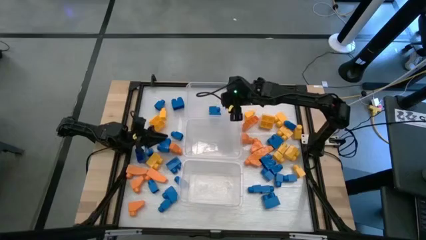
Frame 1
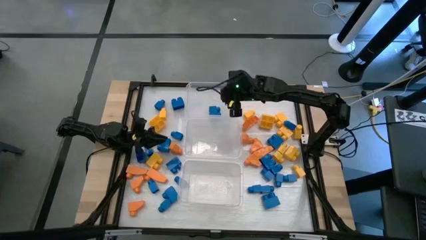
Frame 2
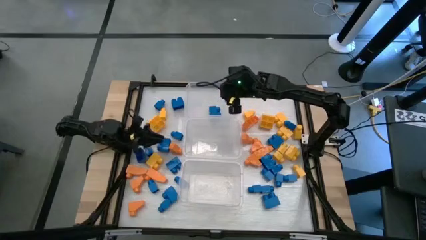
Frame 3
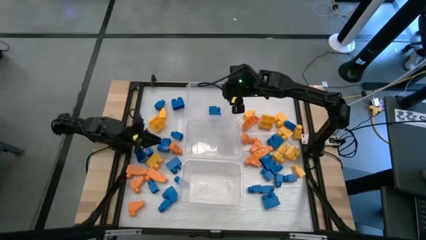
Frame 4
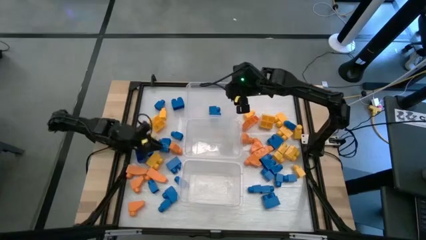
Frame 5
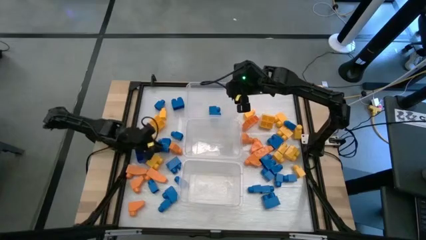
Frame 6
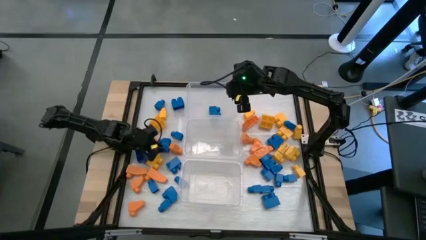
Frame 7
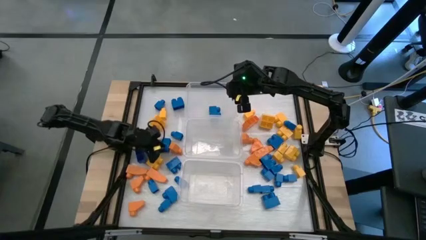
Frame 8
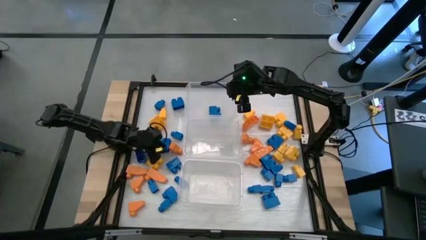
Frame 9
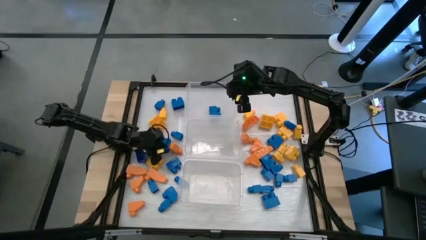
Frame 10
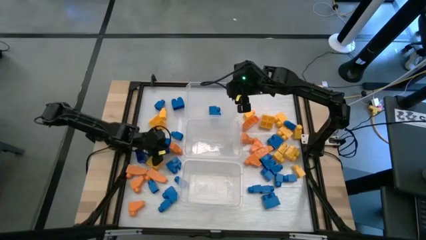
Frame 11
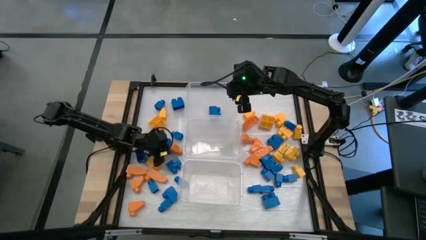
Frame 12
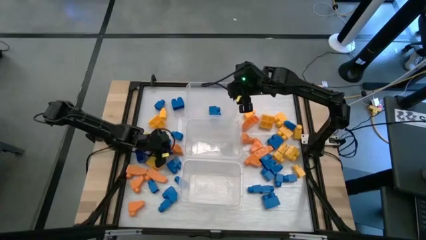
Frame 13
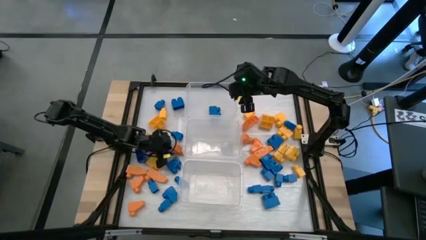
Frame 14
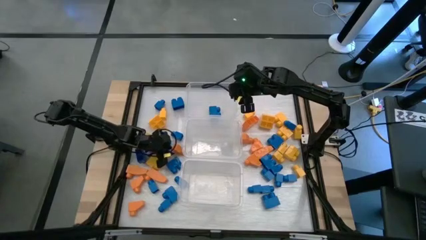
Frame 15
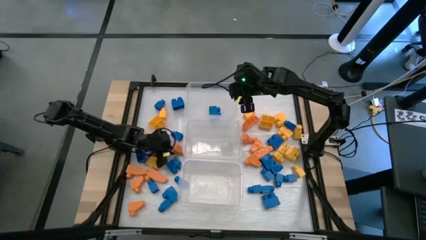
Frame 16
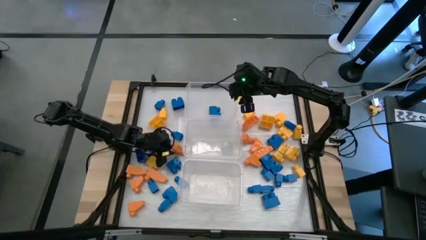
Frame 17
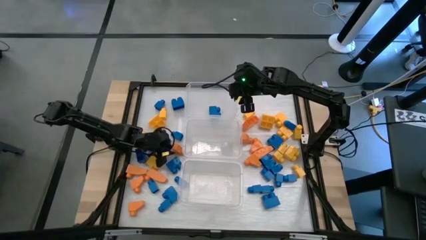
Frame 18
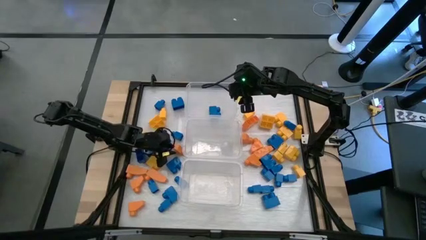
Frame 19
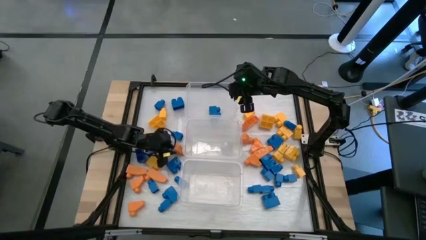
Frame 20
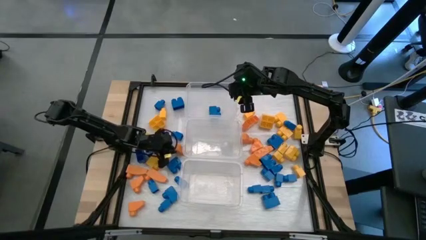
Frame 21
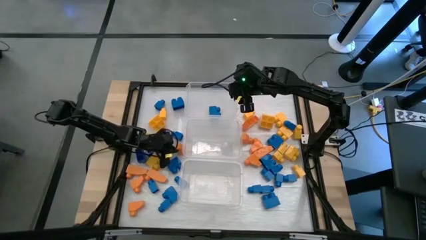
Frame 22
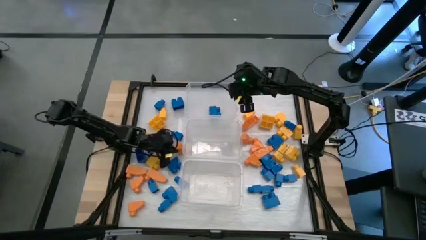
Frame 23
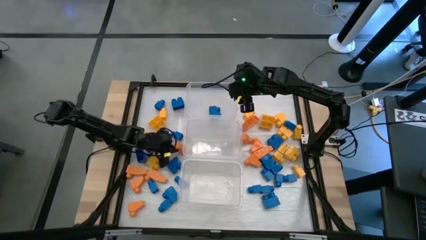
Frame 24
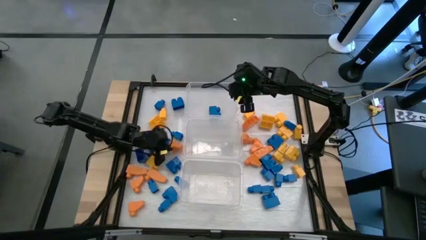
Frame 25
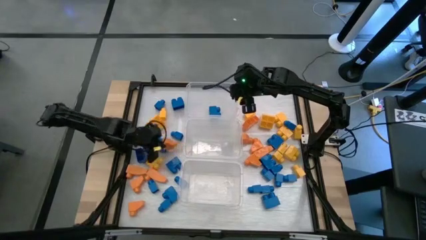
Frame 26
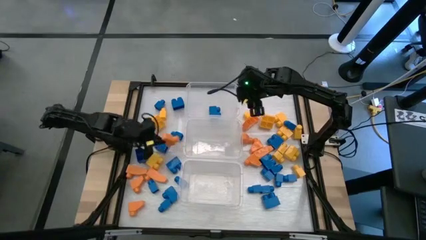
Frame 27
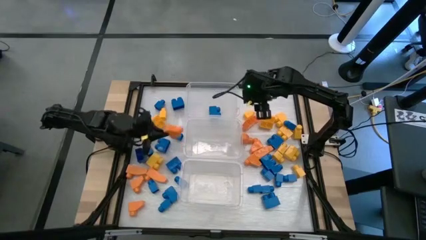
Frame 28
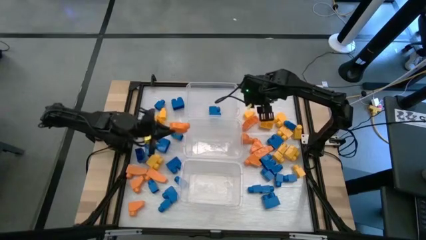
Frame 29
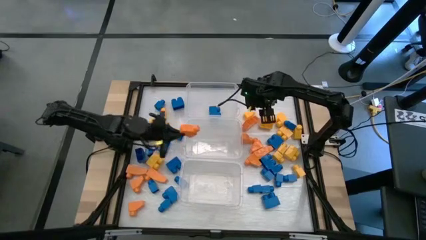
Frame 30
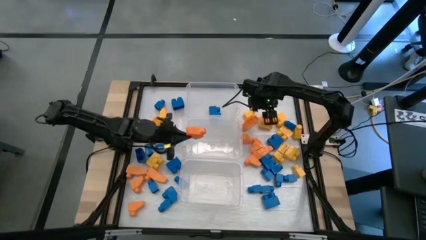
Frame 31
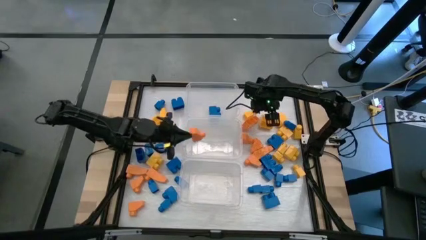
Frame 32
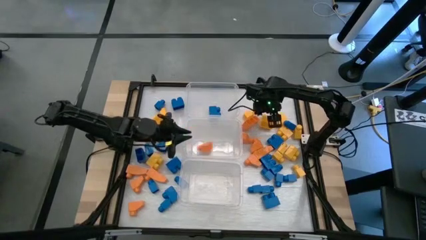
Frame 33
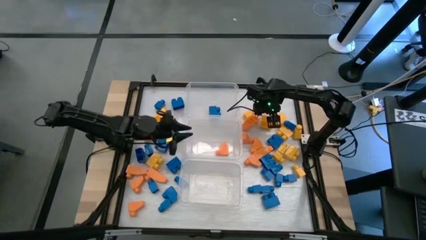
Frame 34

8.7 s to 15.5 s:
Task: Sort blocks
Put the orange game piece into the top transparent bin

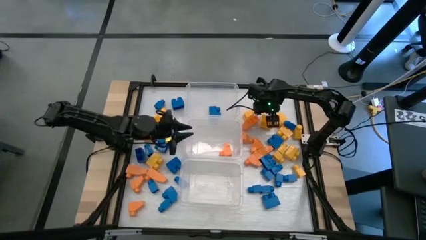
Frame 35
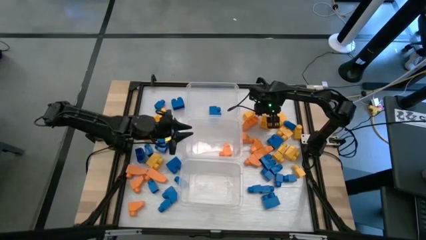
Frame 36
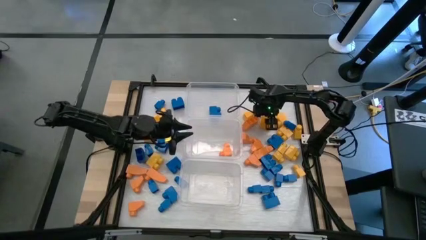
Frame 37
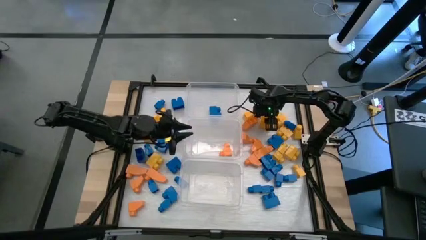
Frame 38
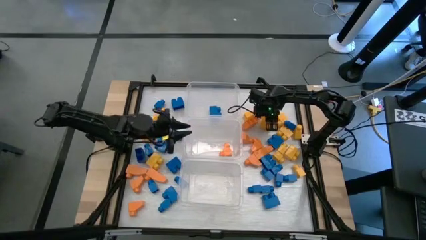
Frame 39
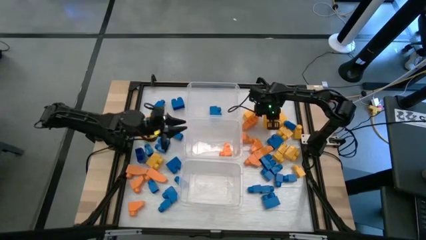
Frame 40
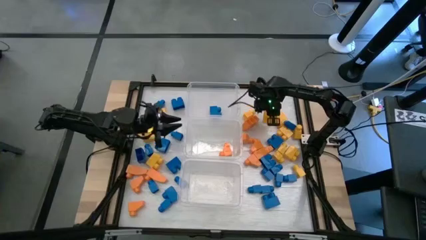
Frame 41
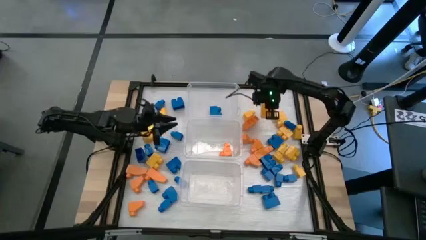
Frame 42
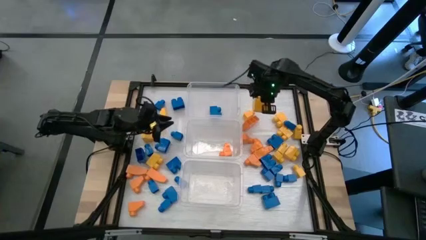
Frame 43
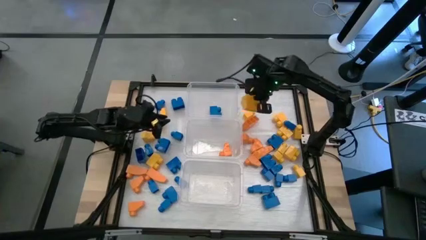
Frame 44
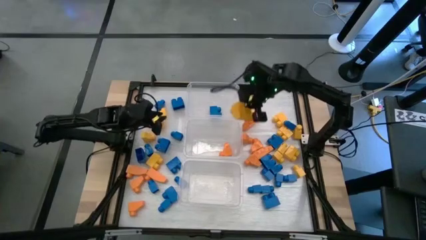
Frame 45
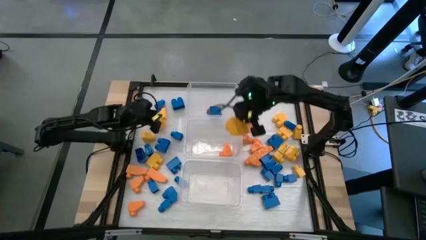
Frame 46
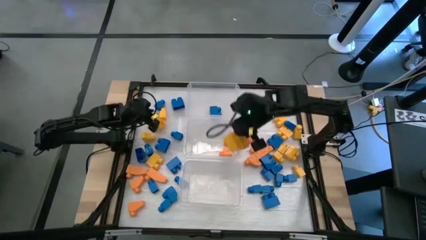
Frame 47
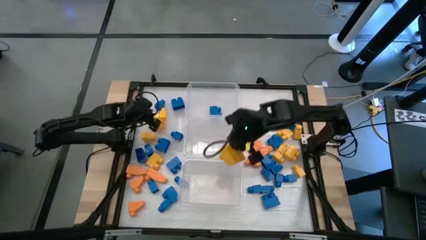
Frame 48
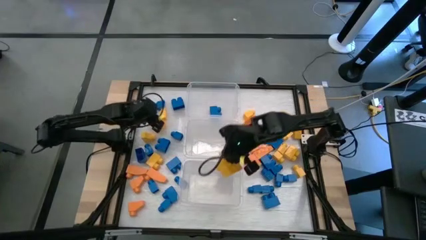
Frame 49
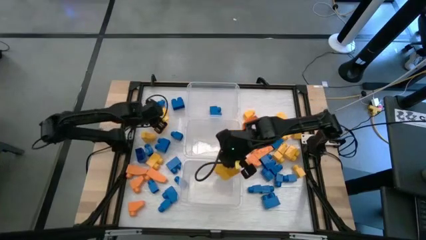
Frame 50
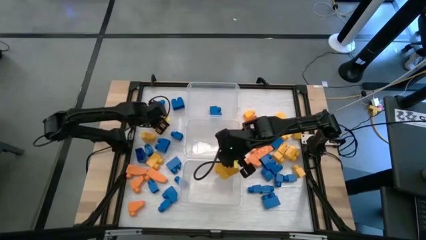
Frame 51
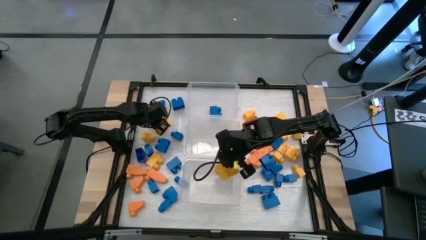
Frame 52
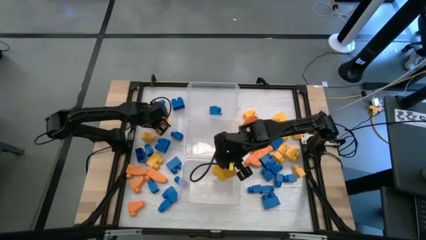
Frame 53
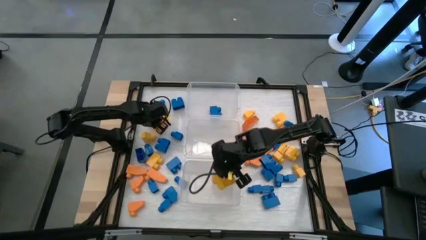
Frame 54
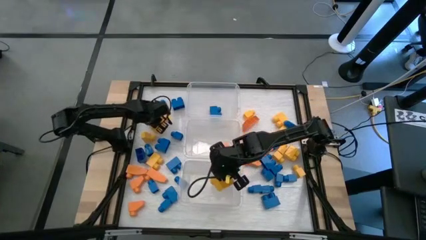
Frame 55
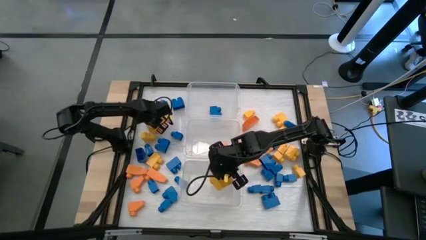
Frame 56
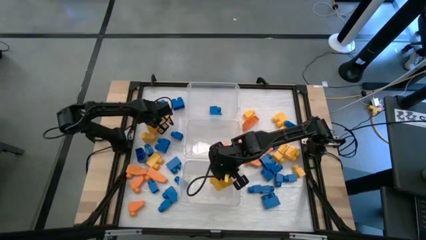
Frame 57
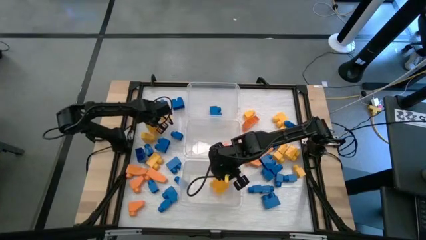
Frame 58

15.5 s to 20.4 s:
Put the yellow game piece into the bottom transparent bin

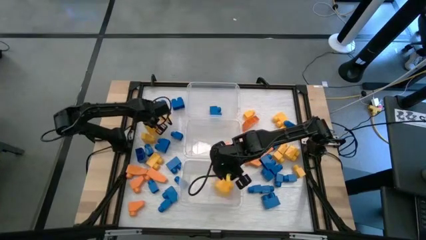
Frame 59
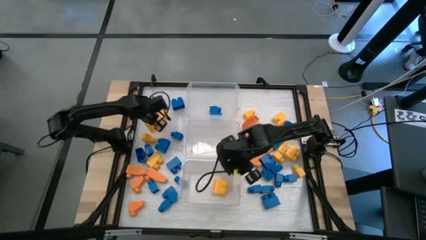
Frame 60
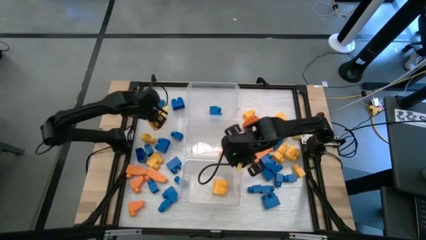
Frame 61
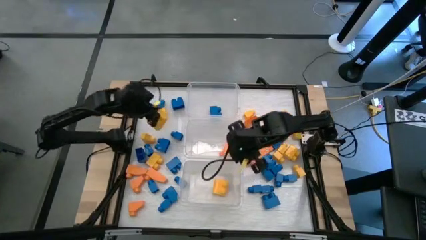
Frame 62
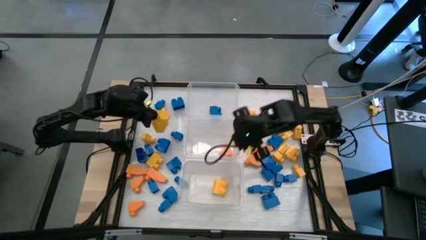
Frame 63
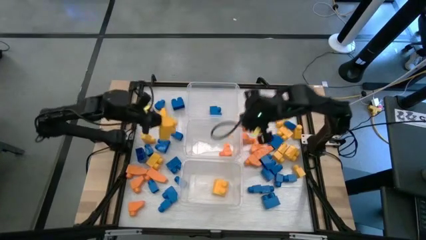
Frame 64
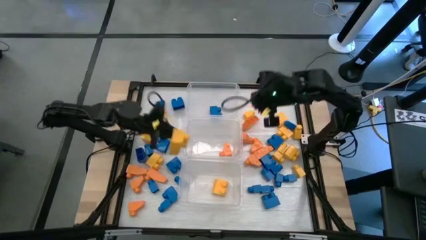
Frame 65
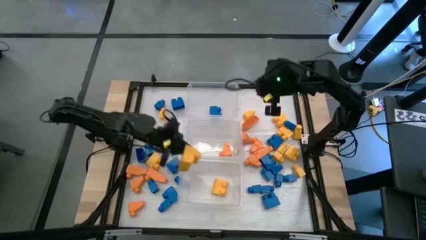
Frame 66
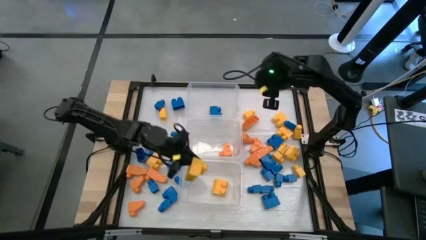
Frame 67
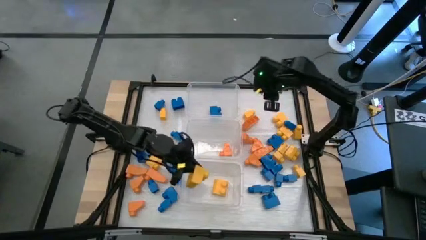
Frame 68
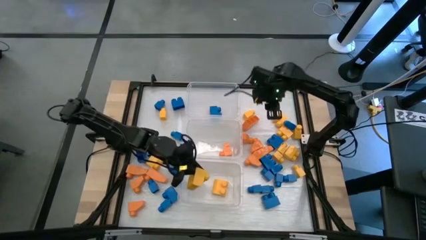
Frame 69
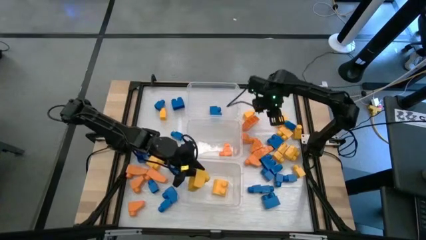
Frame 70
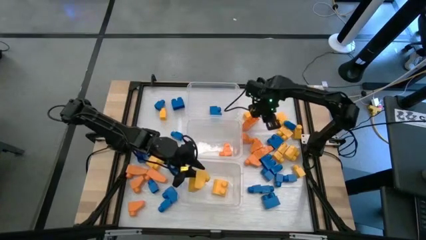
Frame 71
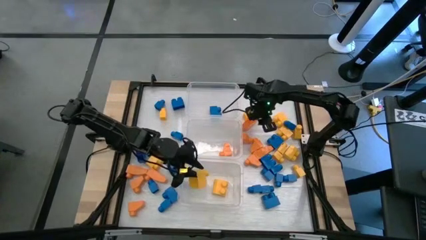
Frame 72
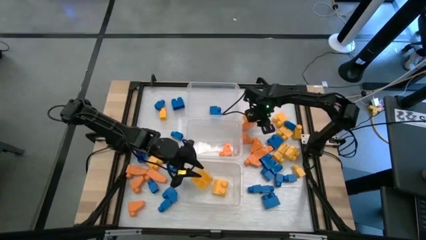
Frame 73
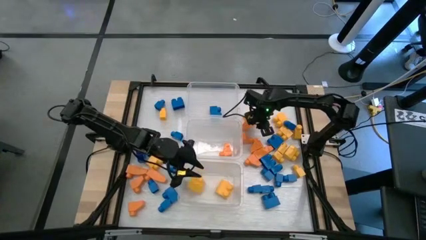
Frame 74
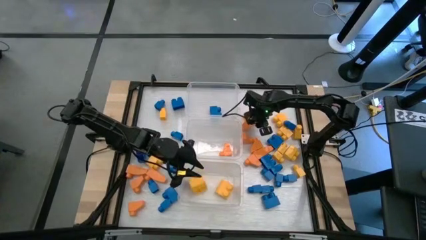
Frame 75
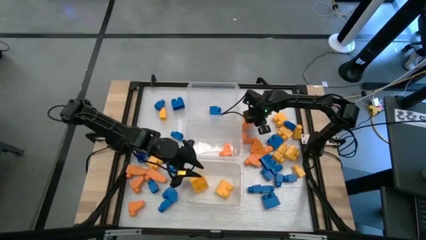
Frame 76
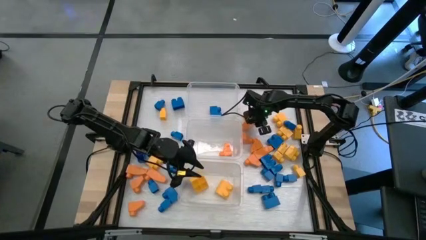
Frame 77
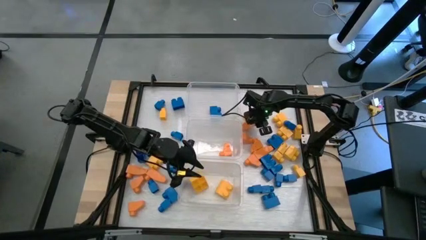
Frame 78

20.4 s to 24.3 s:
Put the yellow game piece into the bottom transparent bin

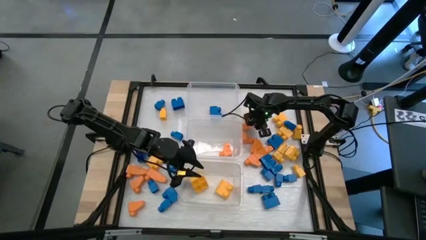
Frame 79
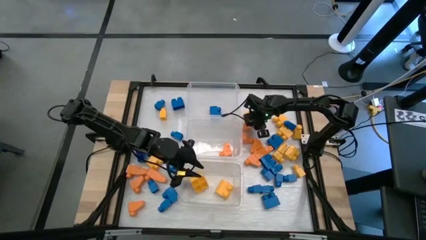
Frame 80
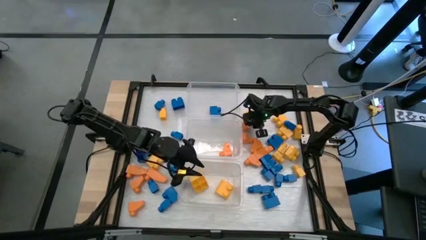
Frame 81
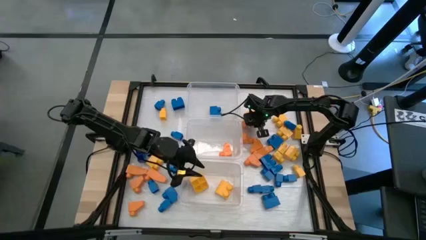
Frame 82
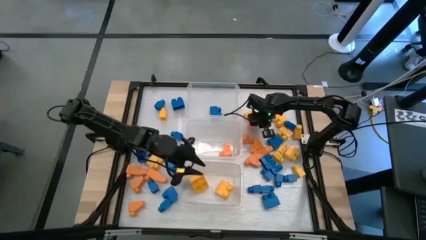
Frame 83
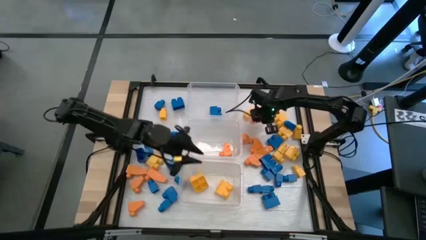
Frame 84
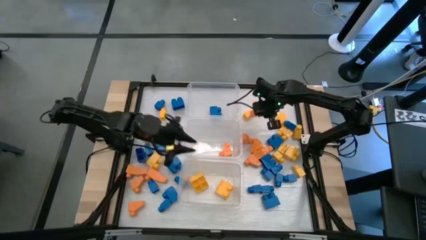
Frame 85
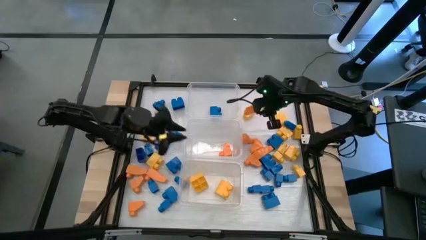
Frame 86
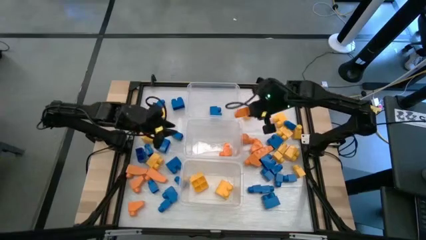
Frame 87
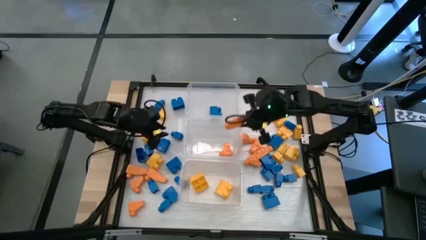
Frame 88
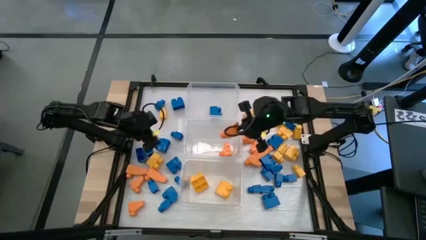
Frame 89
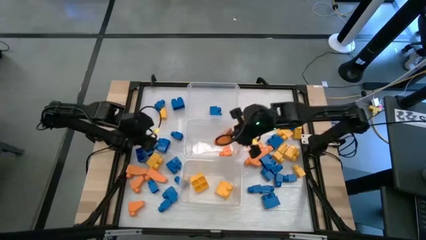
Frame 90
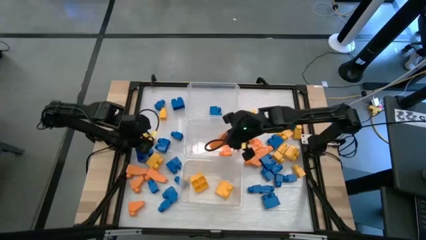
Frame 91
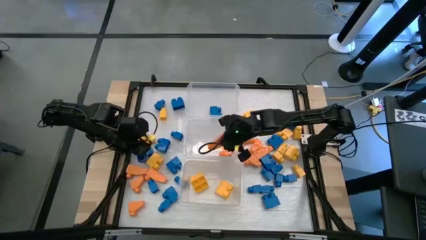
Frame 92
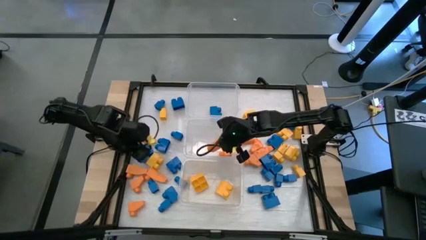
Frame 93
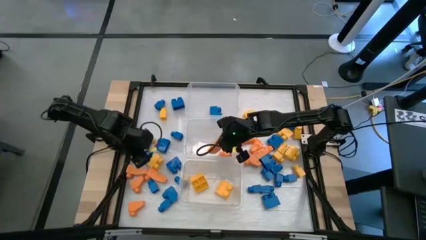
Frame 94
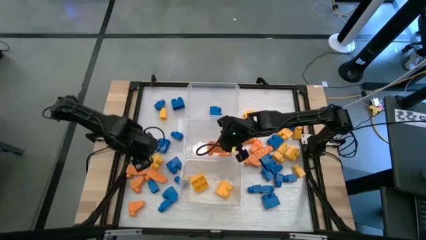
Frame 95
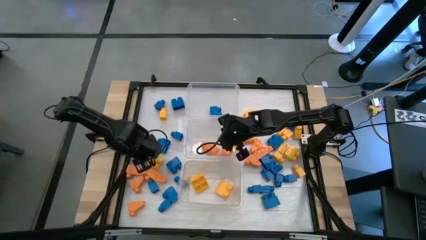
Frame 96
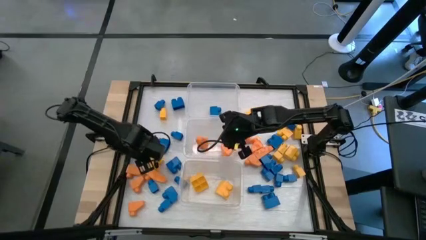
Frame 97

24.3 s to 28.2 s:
Put the orange game piece into the middle transparent bin
